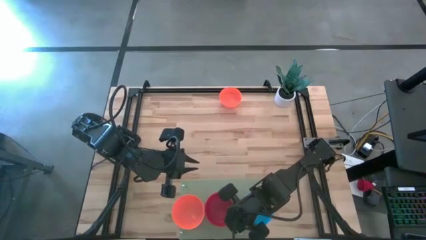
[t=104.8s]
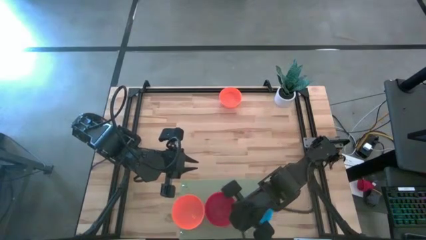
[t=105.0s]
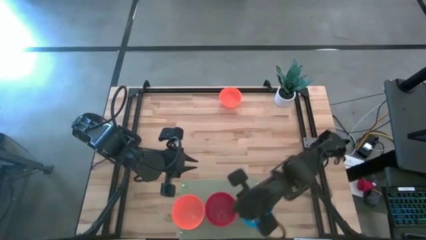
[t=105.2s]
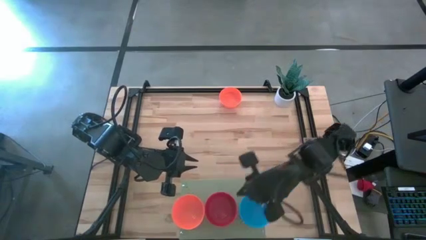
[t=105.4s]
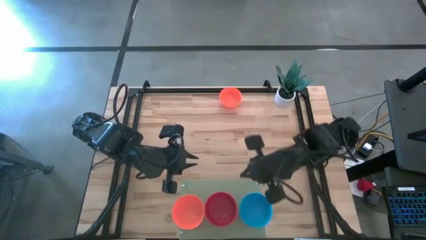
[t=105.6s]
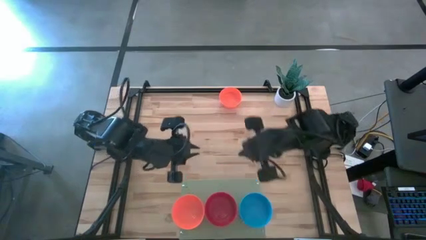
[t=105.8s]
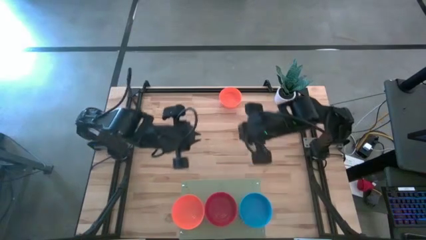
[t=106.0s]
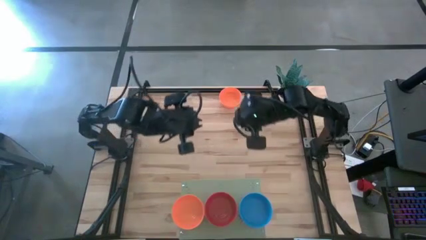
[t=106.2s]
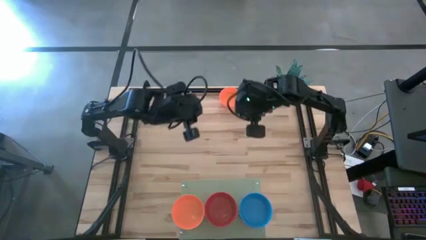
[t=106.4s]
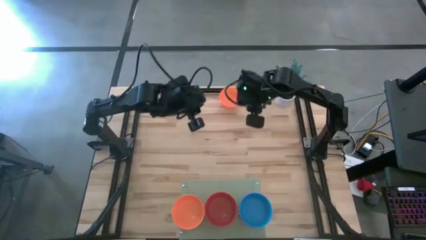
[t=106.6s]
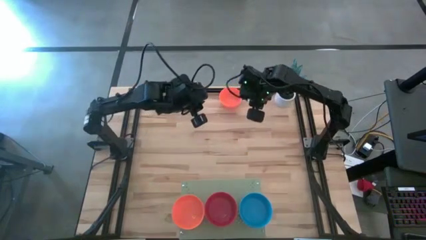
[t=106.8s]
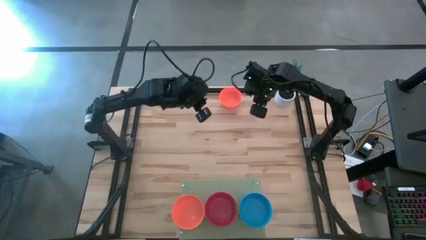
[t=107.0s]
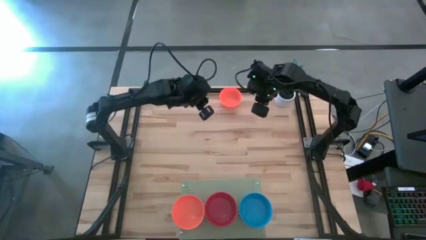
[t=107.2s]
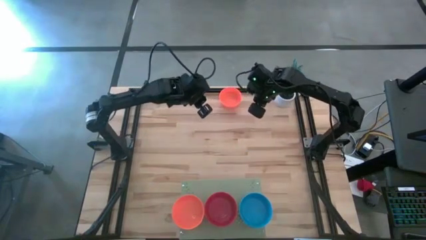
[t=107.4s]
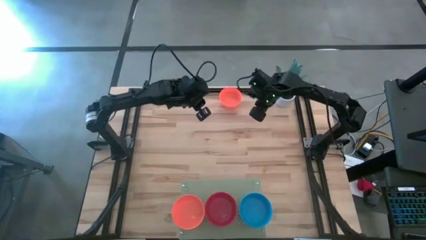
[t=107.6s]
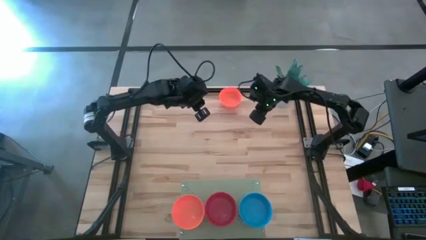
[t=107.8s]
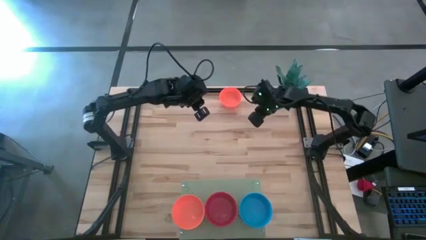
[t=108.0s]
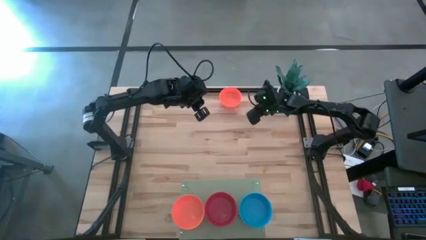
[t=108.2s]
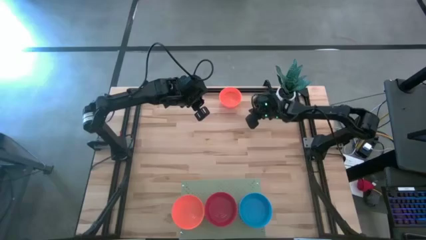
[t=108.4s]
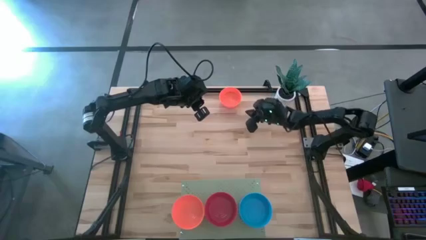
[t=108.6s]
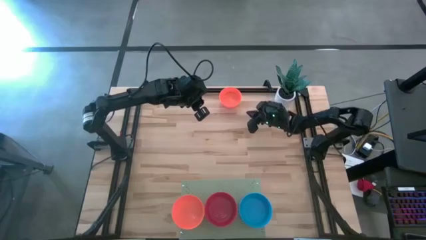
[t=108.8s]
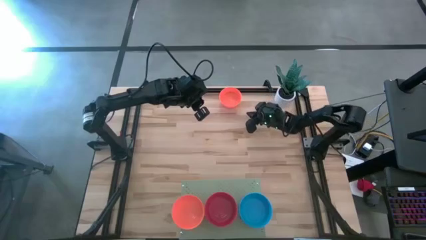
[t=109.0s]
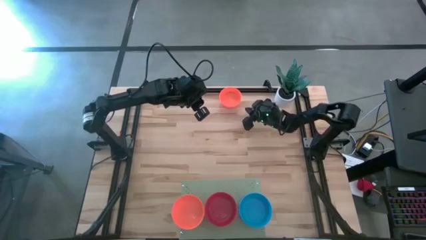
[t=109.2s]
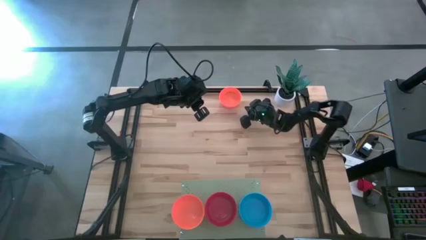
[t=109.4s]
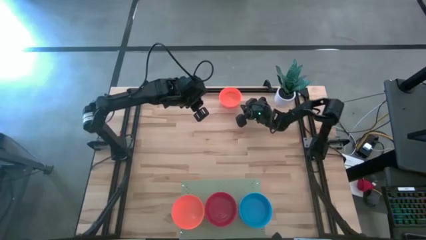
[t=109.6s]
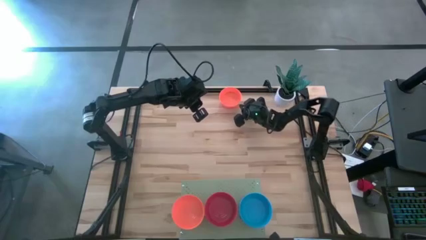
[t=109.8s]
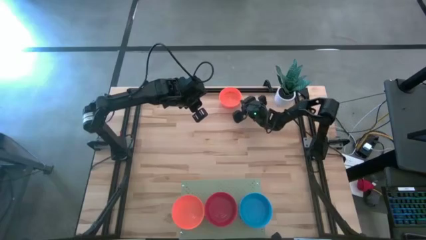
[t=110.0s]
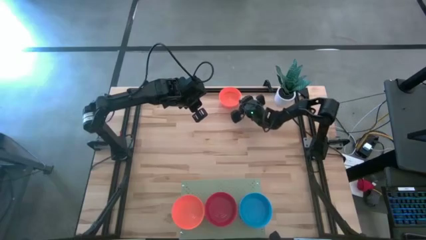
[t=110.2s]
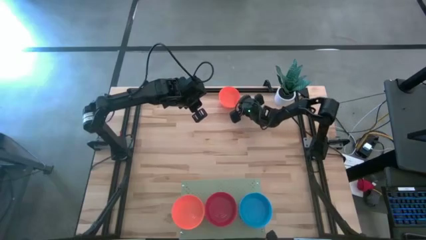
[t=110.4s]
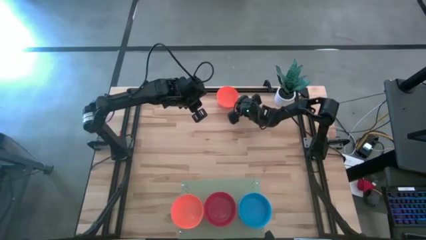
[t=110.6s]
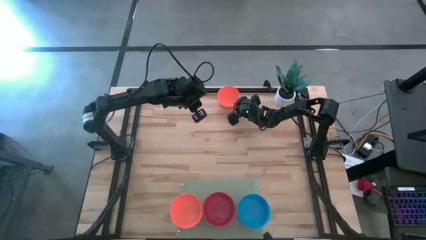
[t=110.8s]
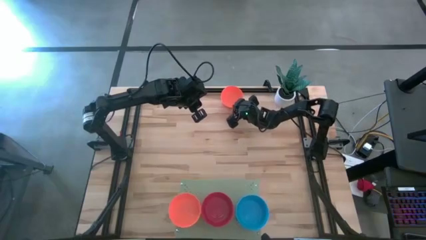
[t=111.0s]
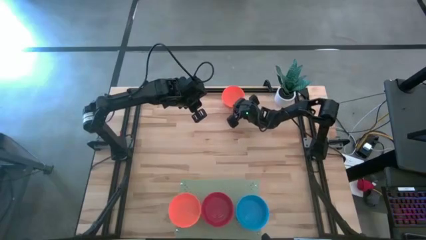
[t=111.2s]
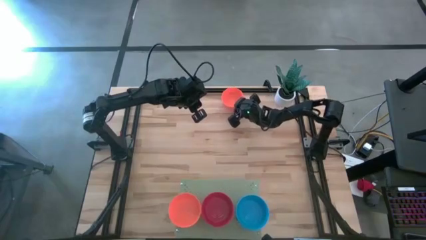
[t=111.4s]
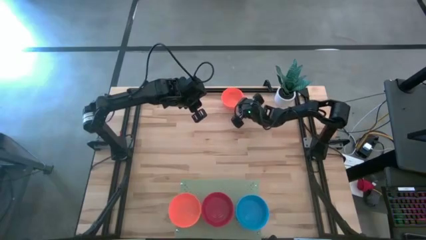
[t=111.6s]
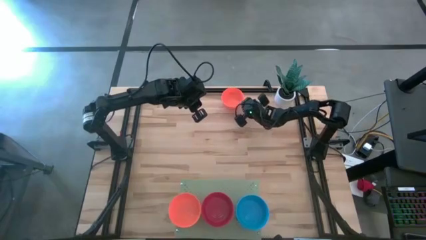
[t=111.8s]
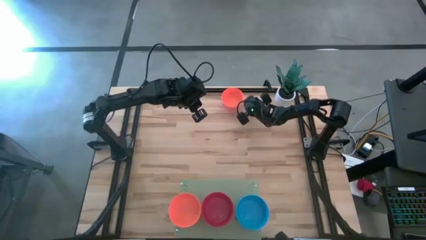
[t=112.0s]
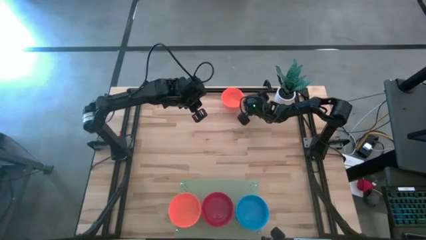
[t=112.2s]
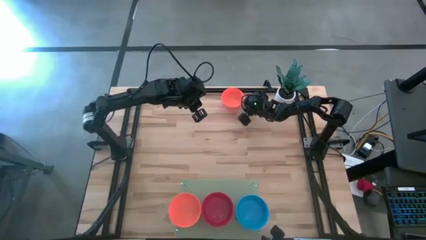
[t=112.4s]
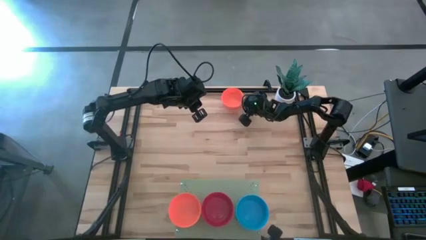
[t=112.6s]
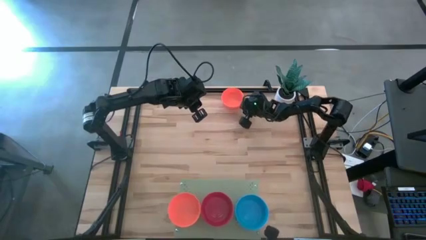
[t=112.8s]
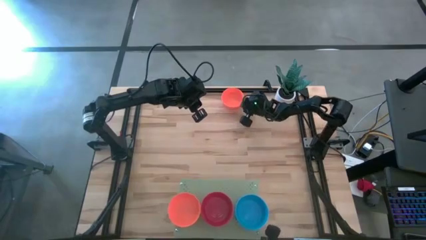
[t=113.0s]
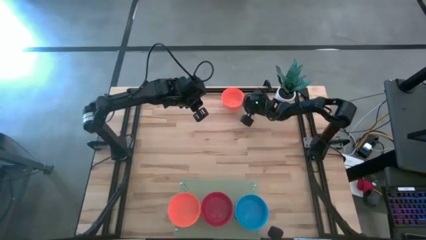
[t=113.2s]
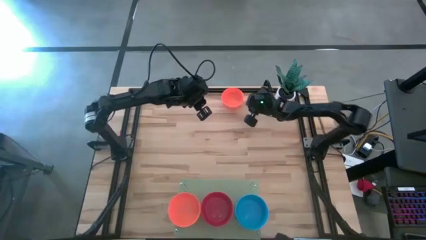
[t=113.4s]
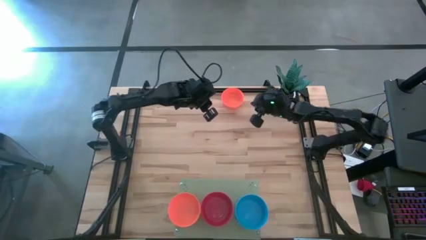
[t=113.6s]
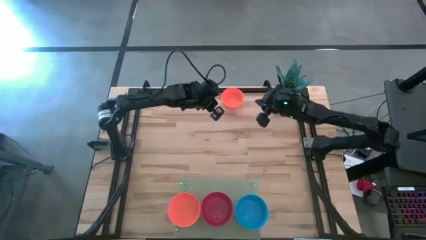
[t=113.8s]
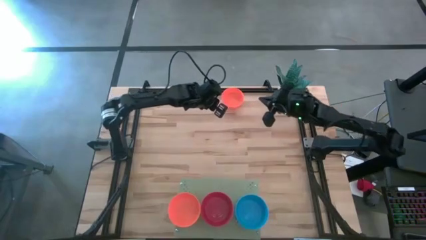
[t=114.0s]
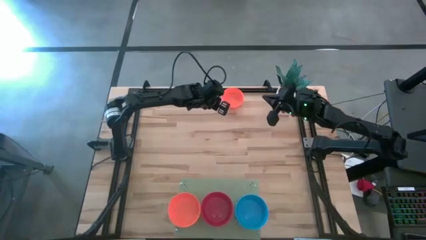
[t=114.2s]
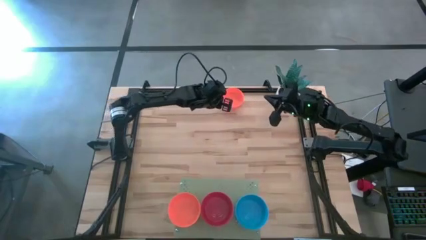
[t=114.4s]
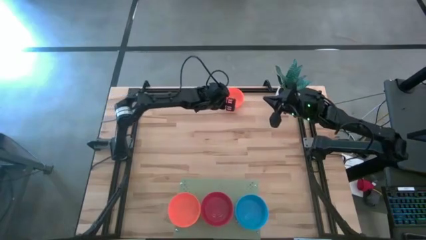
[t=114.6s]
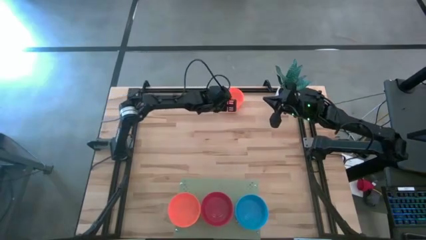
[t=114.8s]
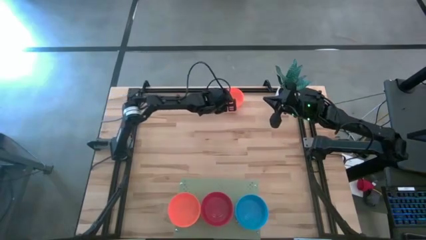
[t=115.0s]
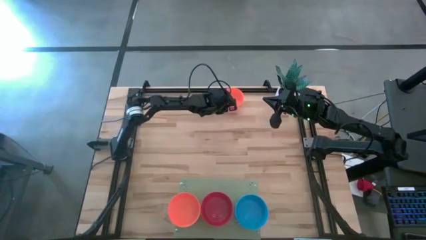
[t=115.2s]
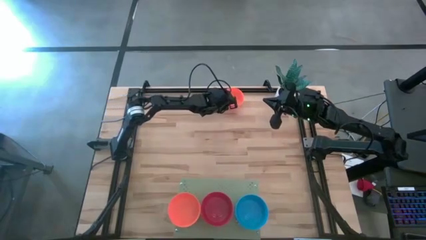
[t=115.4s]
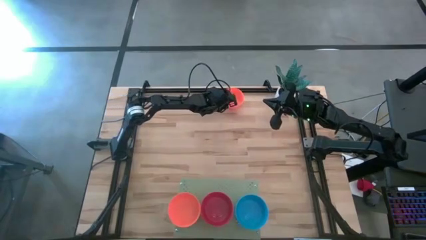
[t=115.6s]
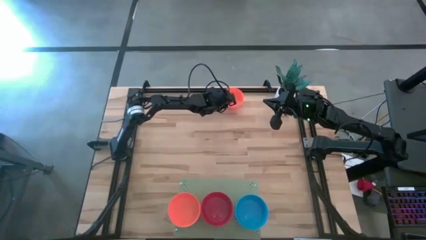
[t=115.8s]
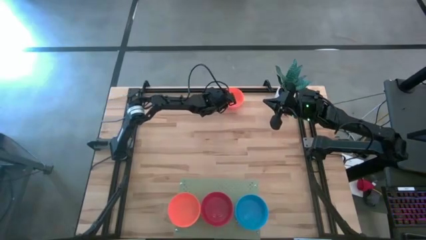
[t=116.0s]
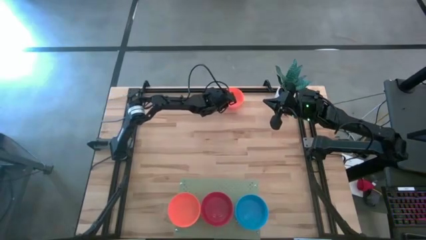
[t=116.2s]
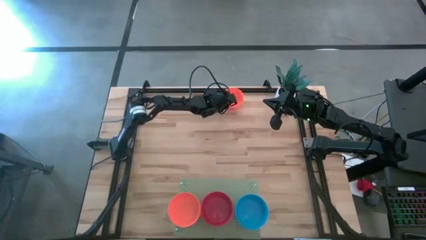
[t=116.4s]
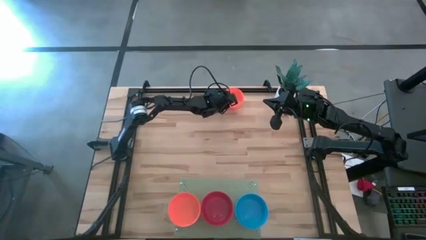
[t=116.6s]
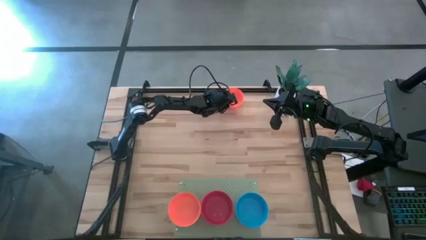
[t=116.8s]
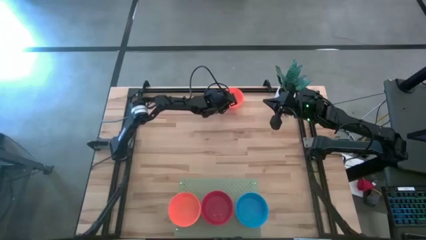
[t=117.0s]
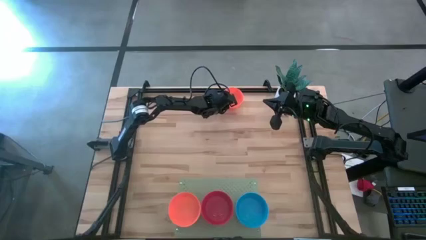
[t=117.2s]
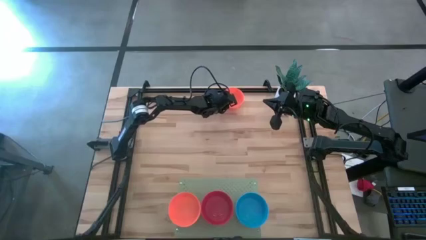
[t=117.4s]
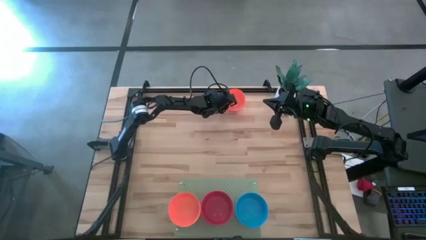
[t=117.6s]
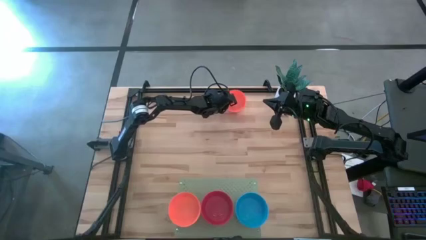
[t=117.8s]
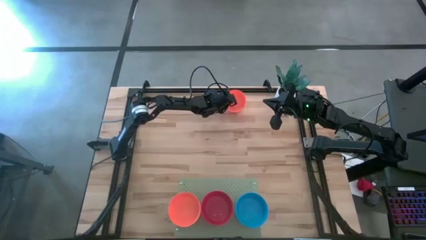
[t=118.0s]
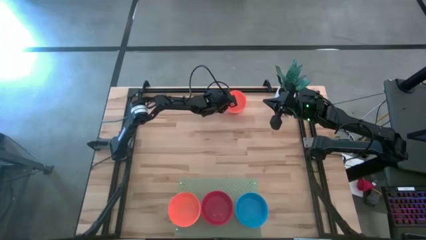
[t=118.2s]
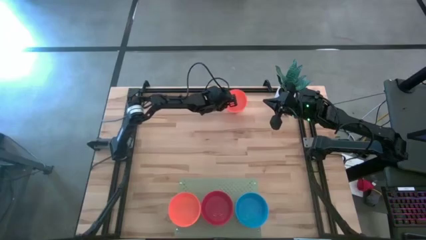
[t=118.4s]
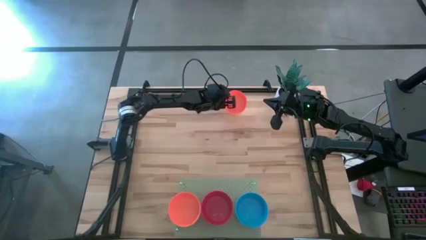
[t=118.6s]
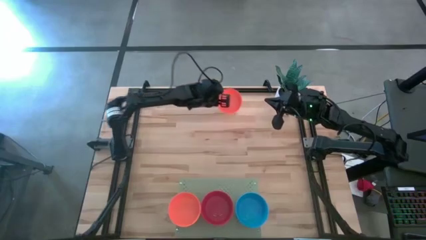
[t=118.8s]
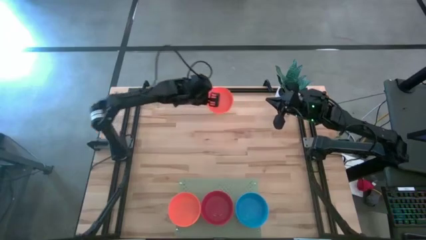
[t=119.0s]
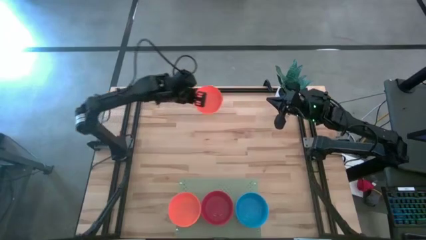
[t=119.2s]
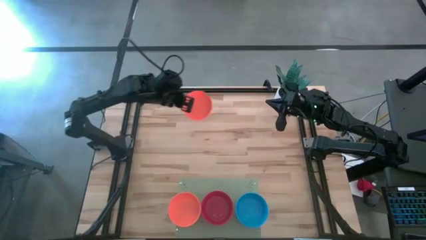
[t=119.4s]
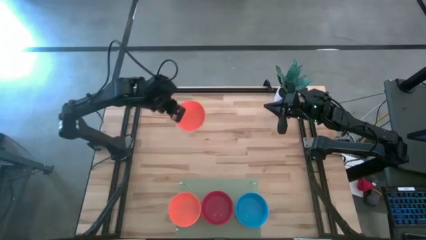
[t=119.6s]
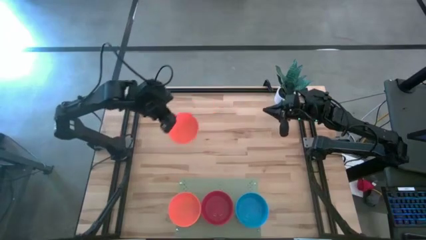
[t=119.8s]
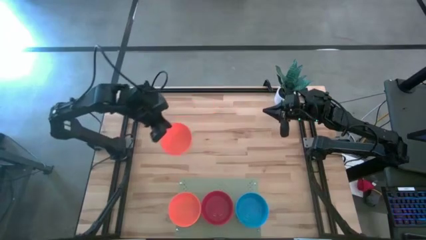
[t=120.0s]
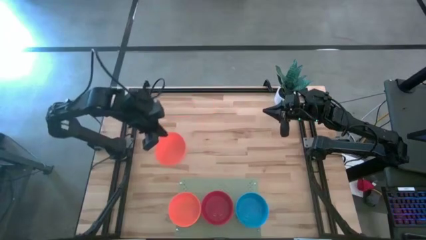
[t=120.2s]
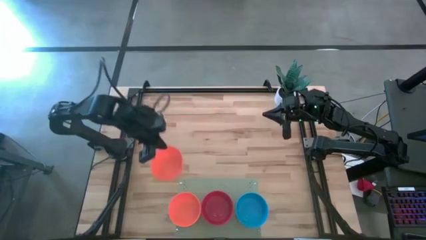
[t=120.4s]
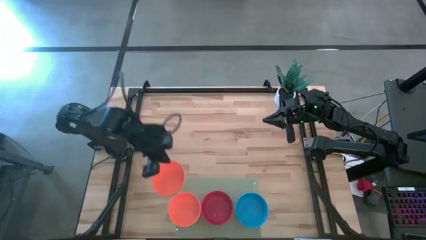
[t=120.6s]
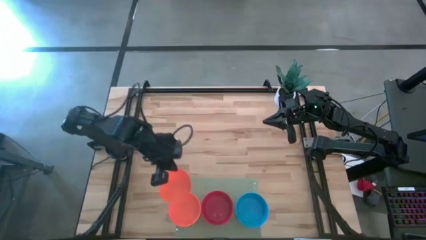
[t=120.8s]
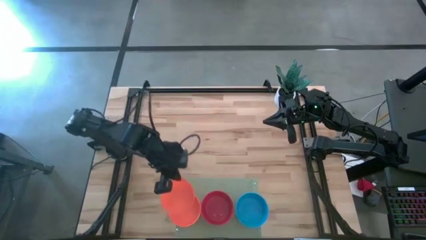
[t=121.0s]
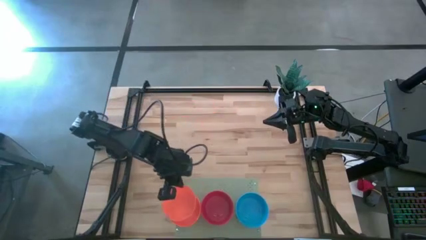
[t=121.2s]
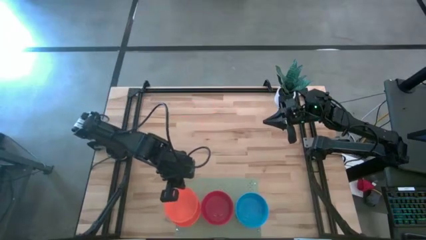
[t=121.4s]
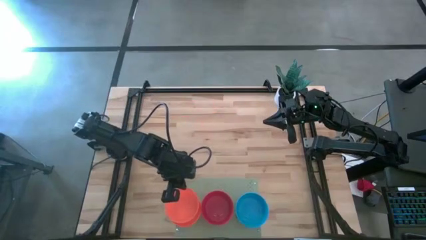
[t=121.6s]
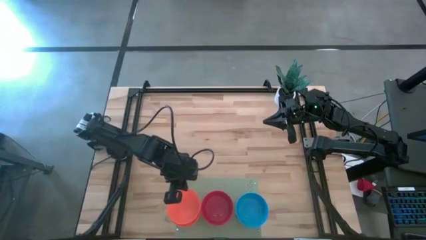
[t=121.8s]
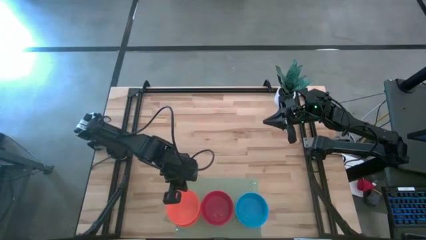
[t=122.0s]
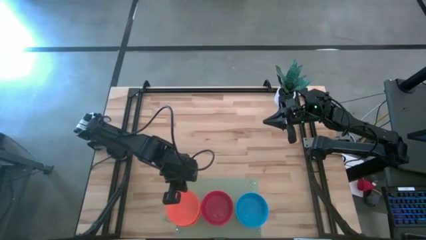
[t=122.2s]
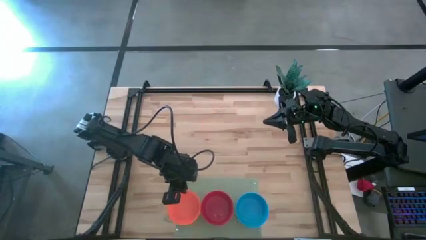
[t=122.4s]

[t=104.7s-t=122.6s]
Task: Pick & Place Mini bowls
Stack the orange bowl on the orange bowl on the shelf
